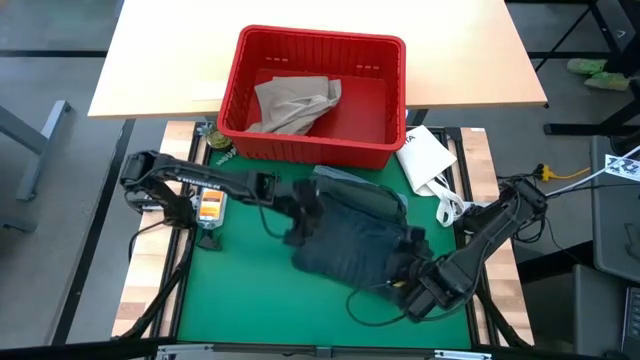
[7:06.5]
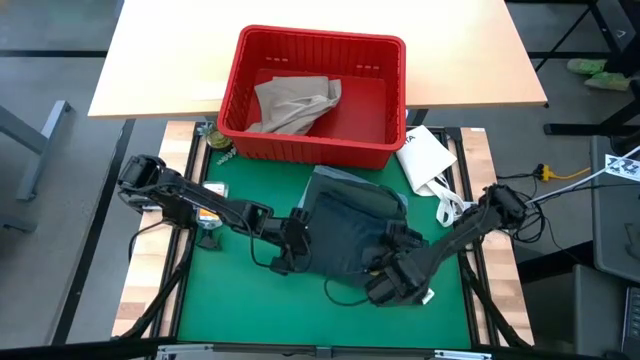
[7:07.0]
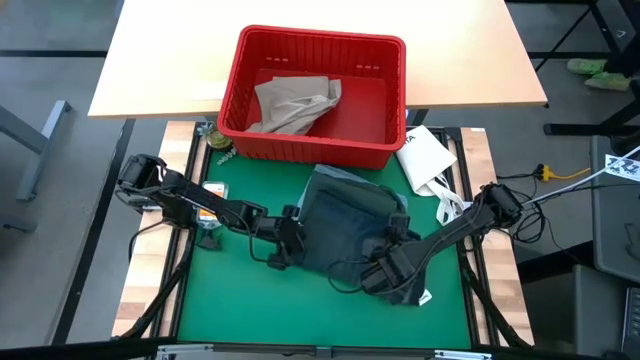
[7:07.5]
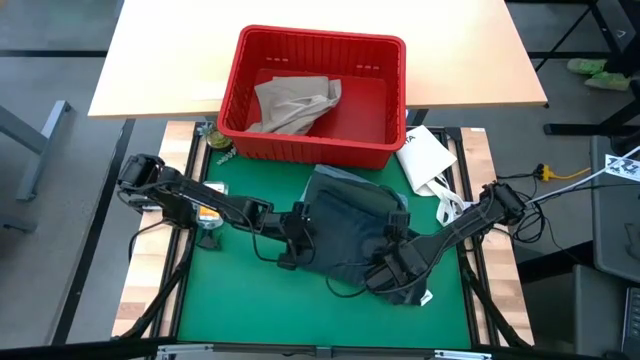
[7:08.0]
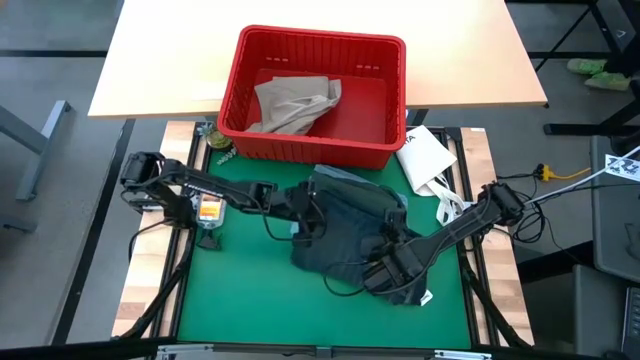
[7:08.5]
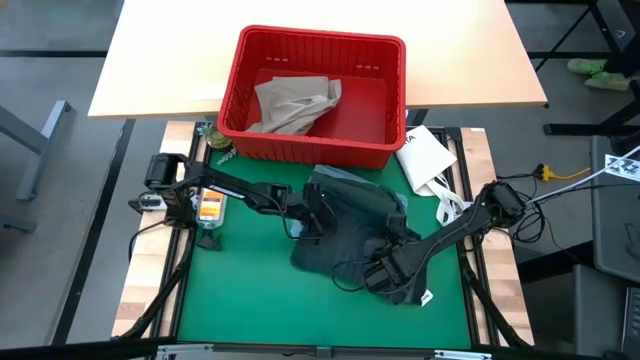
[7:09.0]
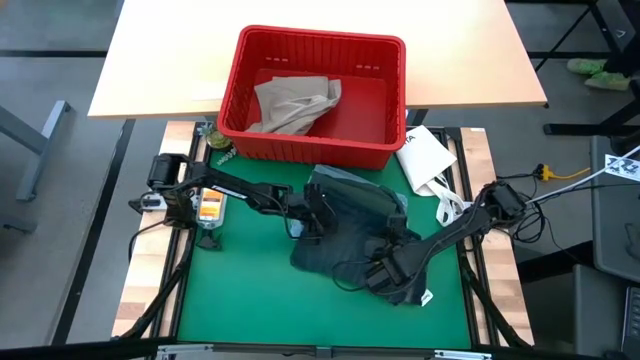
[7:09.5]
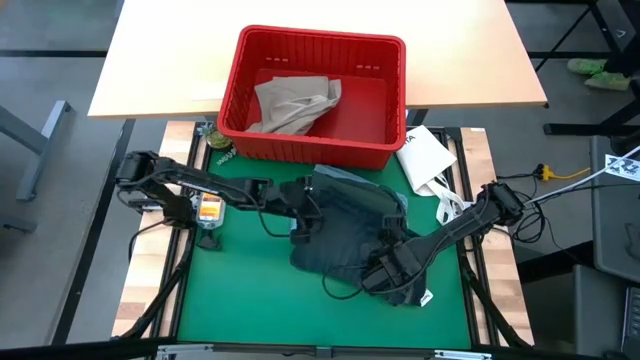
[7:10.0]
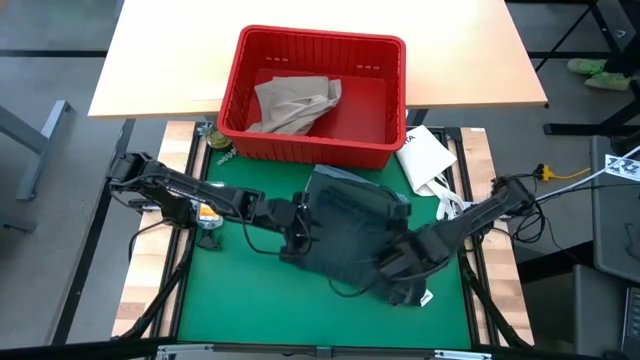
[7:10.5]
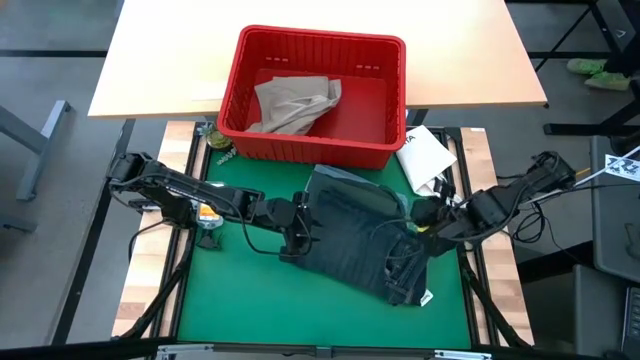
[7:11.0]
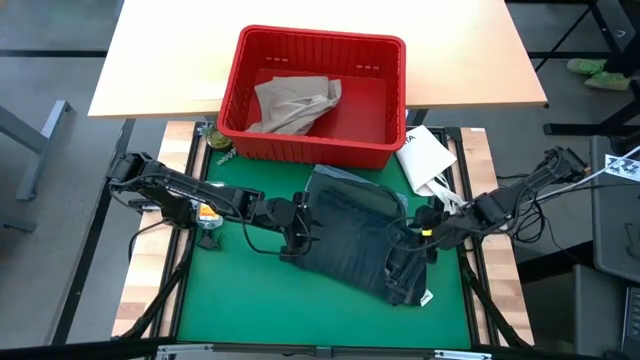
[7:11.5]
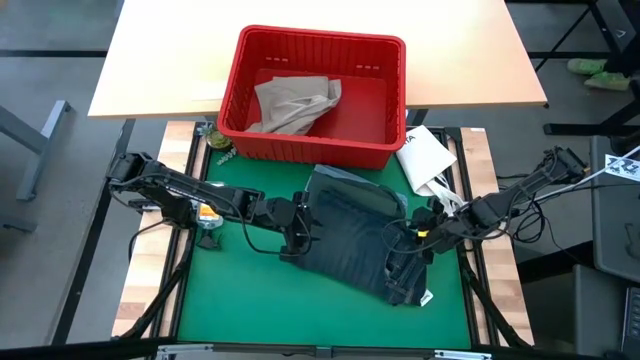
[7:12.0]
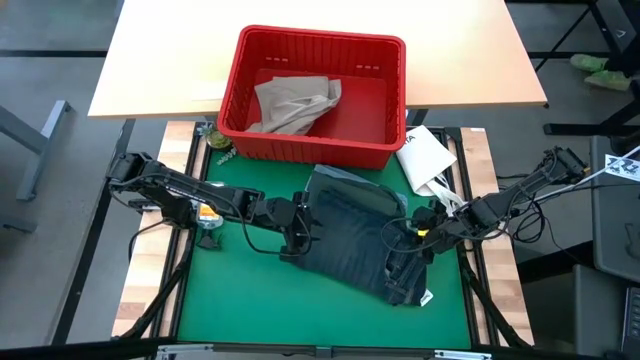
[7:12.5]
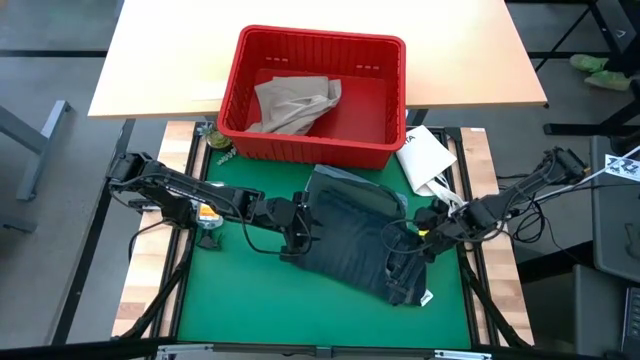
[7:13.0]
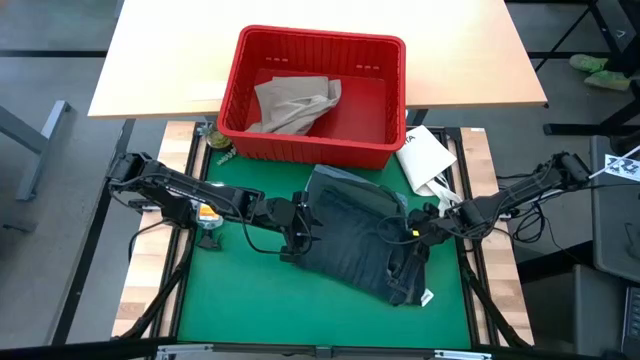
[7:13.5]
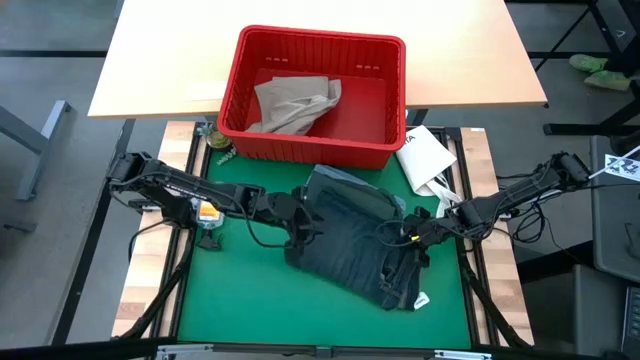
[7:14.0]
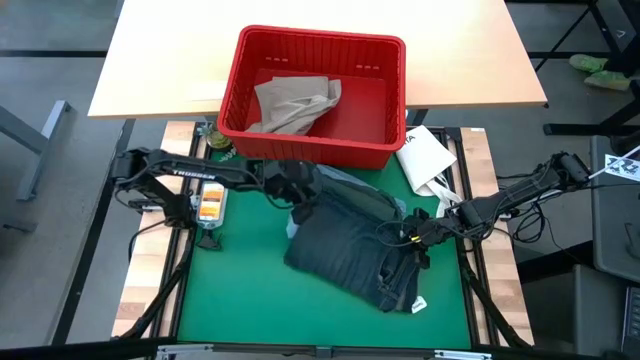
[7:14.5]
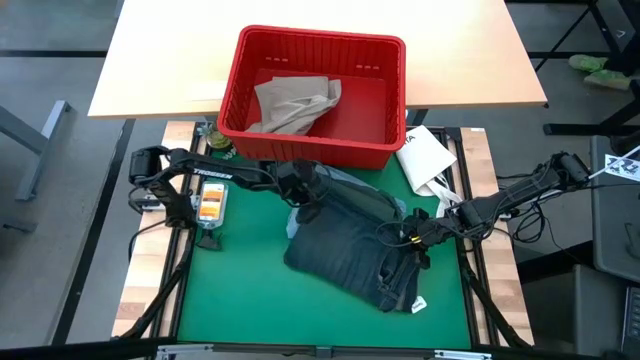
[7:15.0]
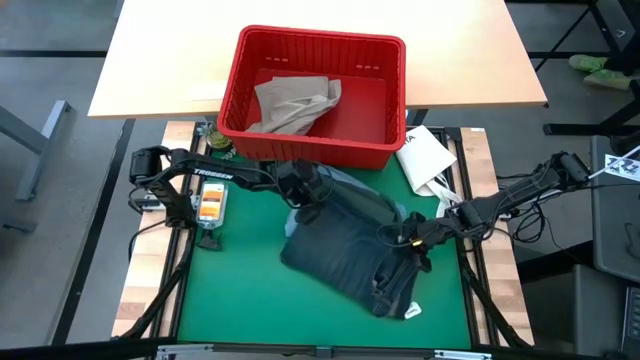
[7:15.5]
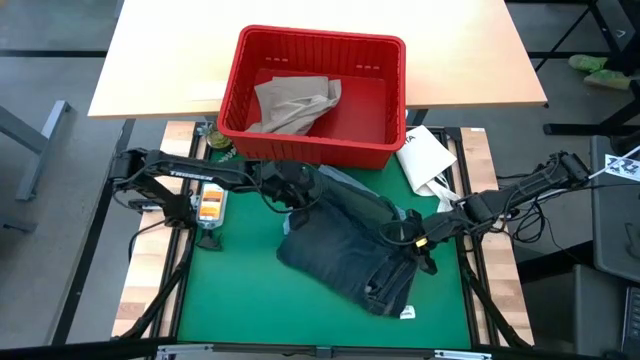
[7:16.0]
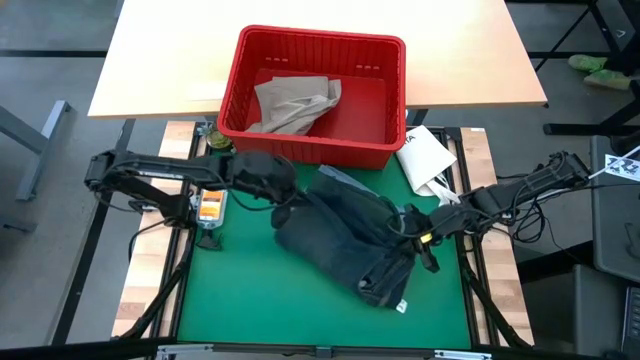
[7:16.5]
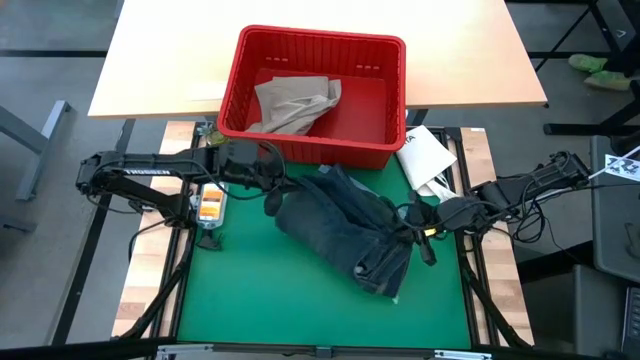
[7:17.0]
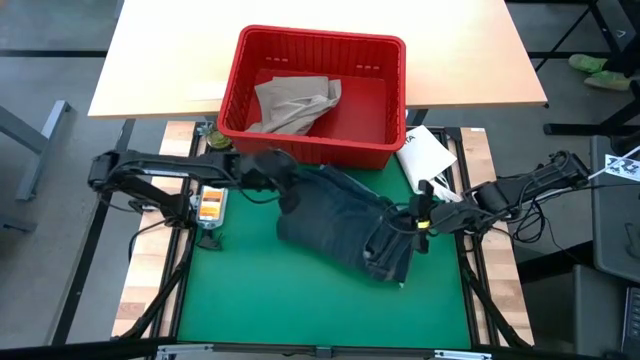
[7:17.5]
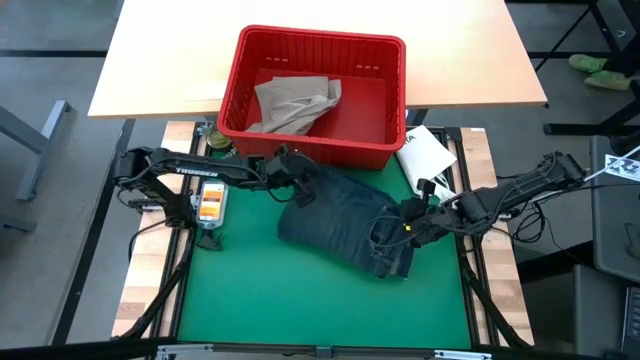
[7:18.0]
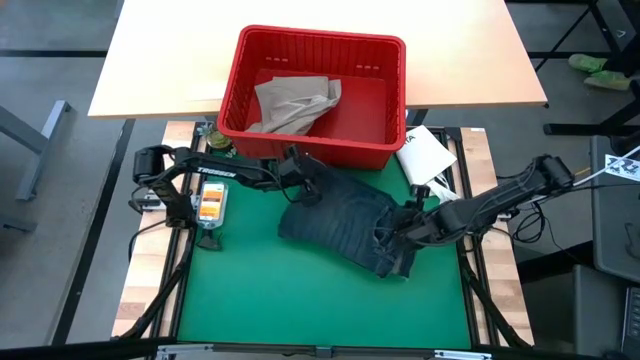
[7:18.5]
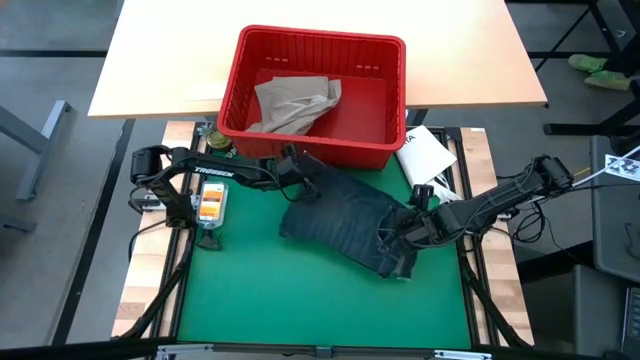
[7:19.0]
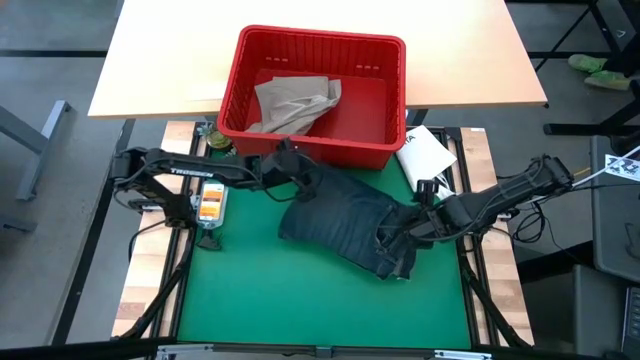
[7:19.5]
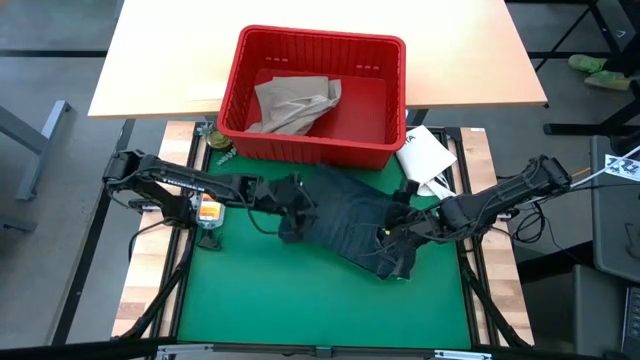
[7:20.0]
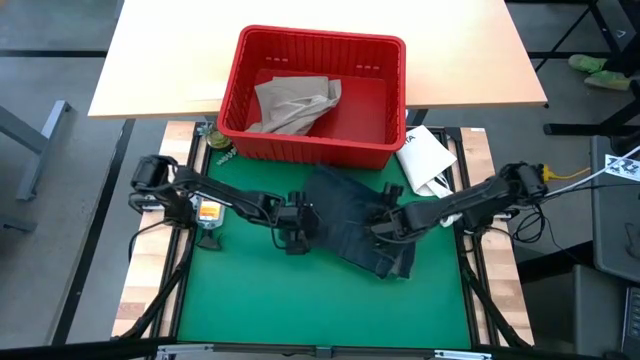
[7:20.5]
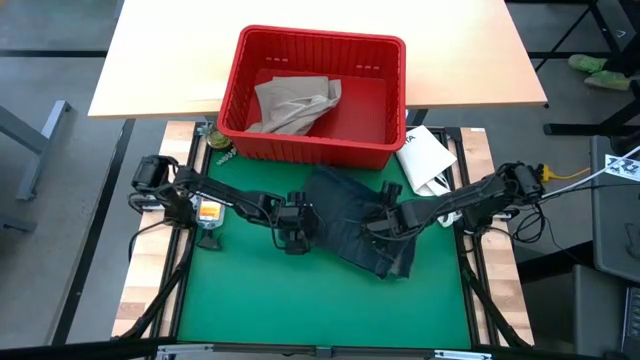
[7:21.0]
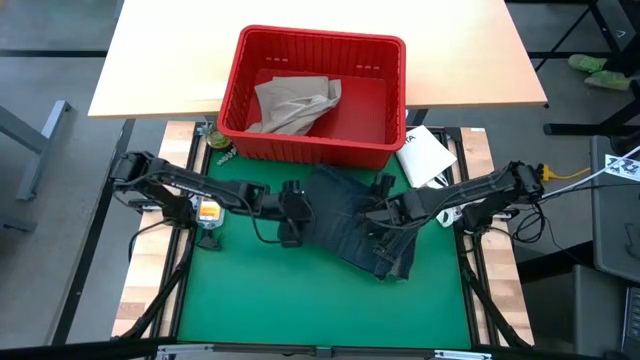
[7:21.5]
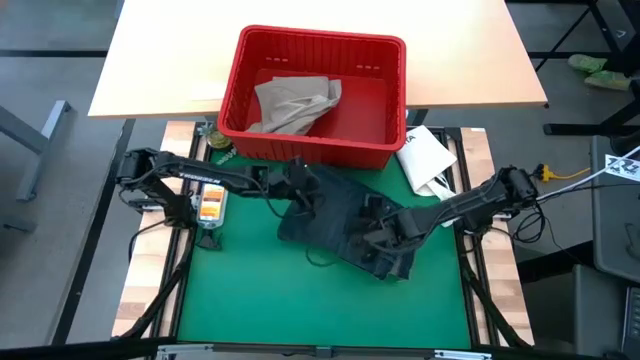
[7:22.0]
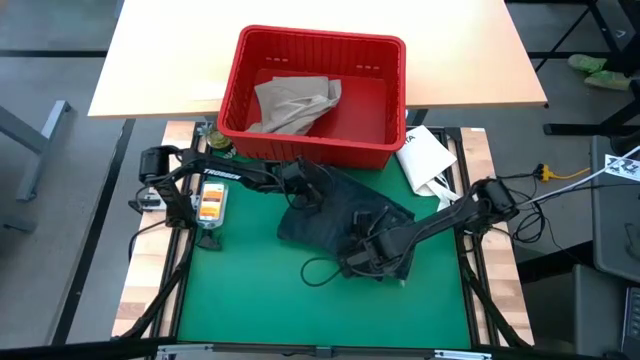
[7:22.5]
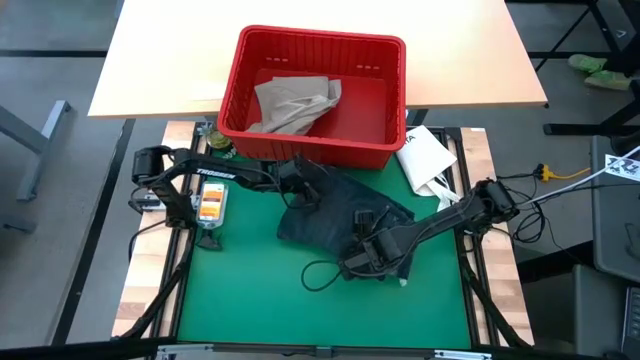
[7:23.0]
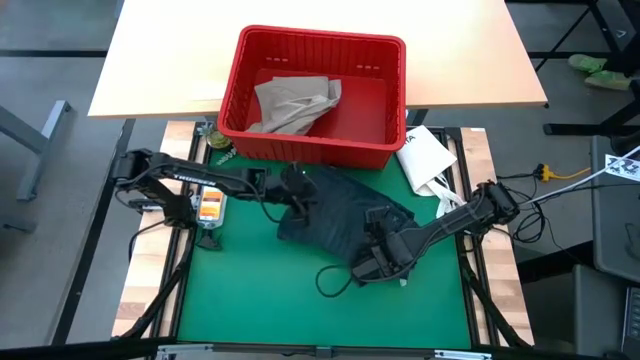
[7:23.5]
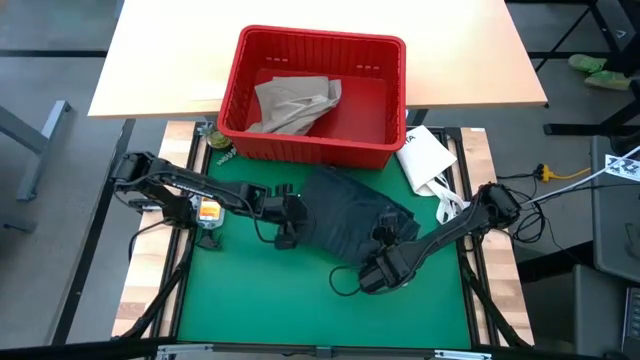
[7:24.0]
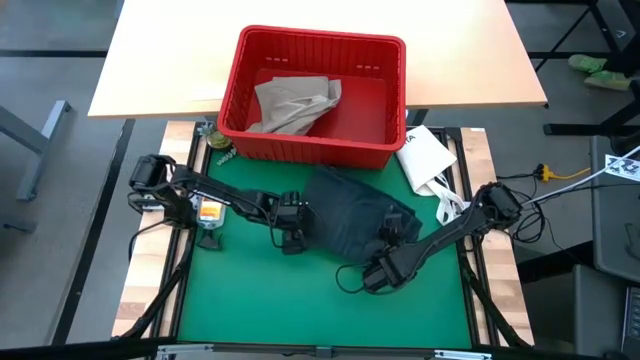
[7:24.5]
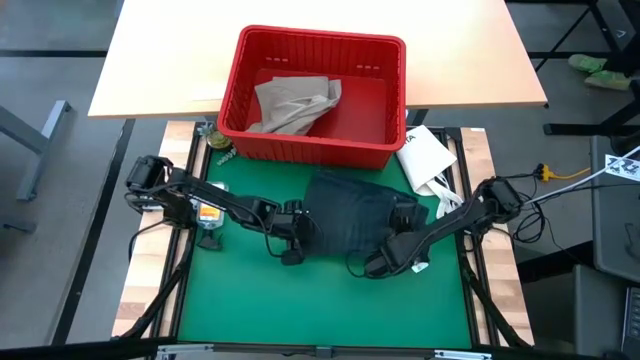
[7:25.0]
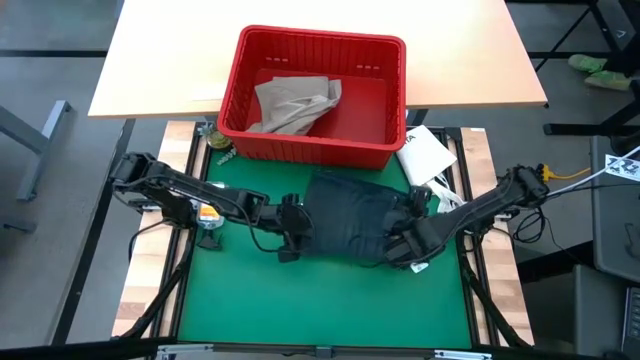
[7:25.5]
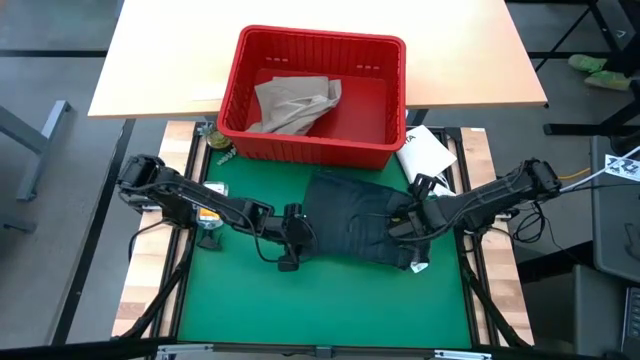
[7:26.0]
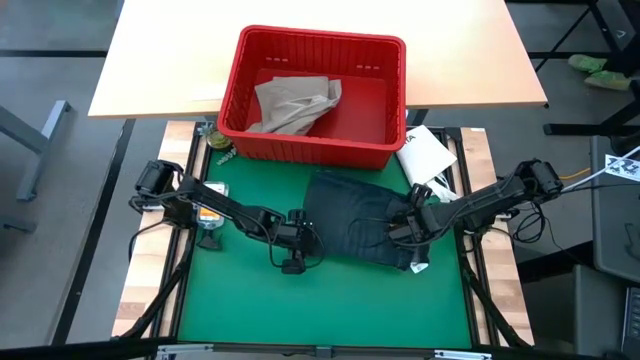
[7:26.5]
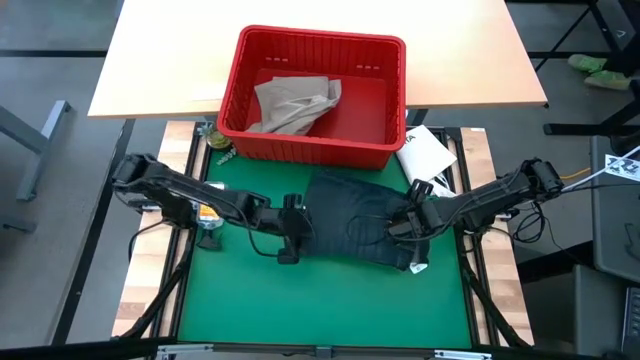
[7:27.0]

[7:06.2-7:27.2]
Task: Fold Laundry from Bin
Stack the dark blue pants on top of the folded blue pants
